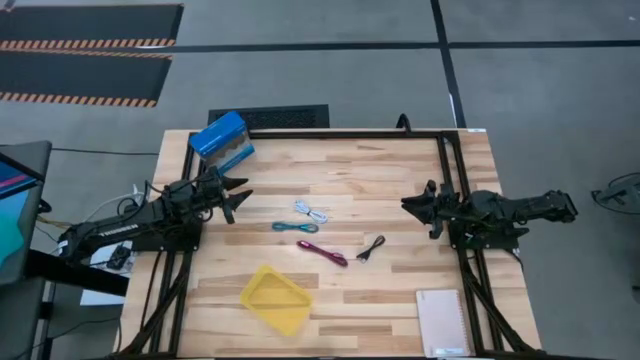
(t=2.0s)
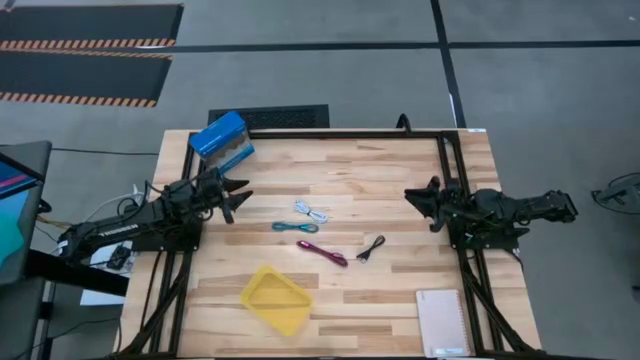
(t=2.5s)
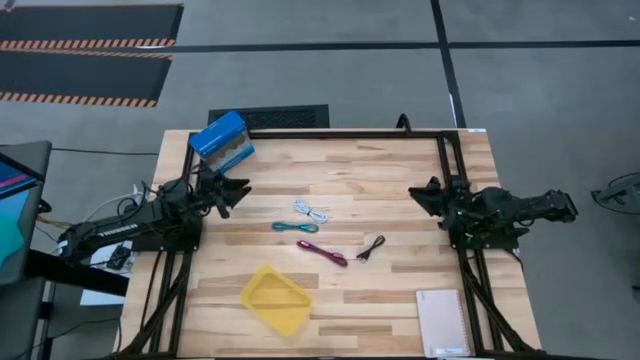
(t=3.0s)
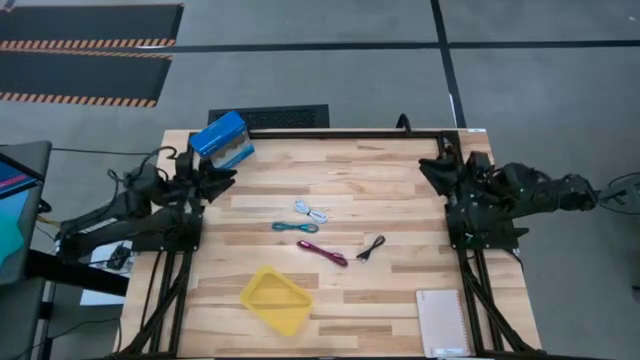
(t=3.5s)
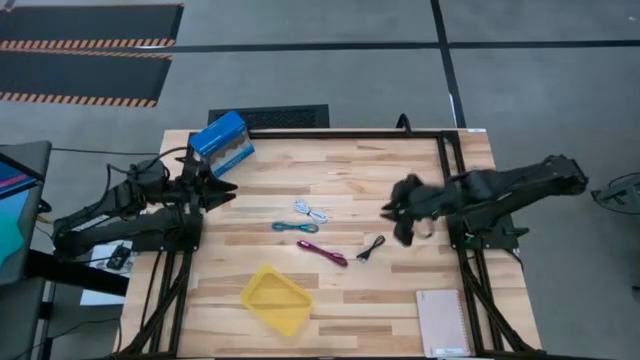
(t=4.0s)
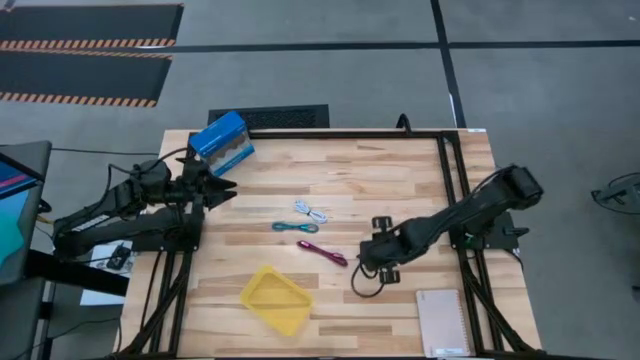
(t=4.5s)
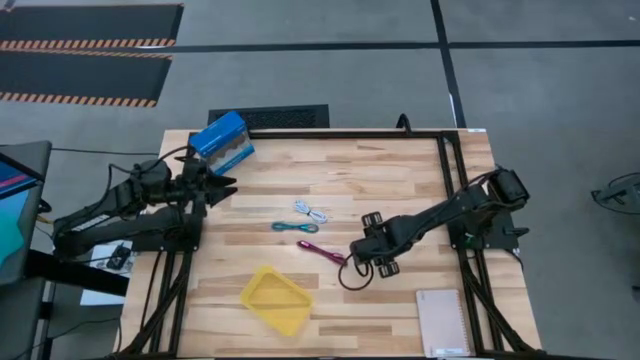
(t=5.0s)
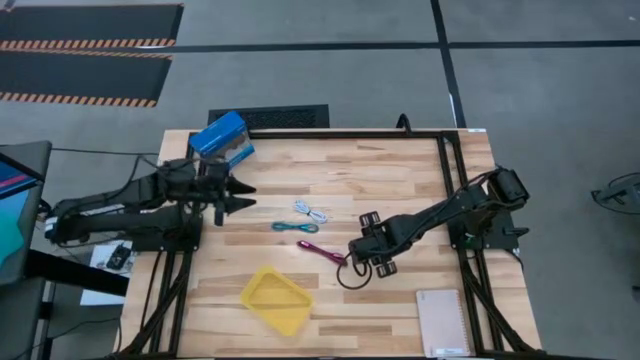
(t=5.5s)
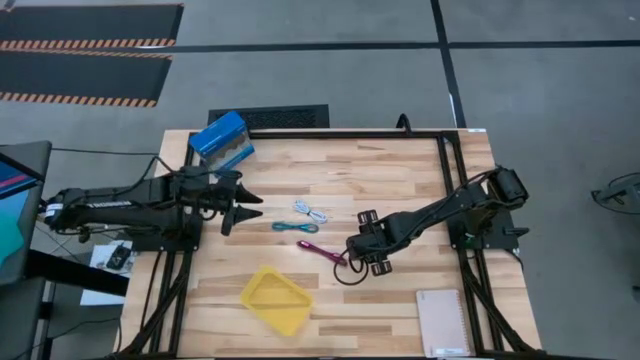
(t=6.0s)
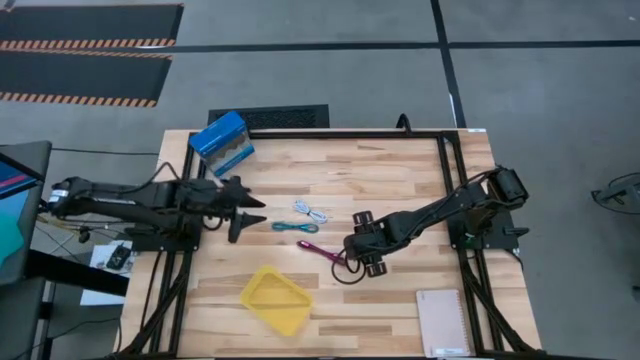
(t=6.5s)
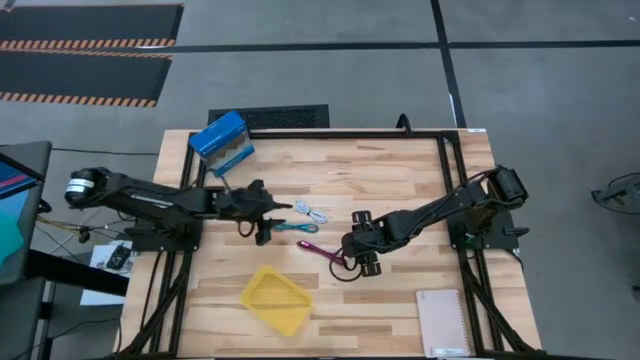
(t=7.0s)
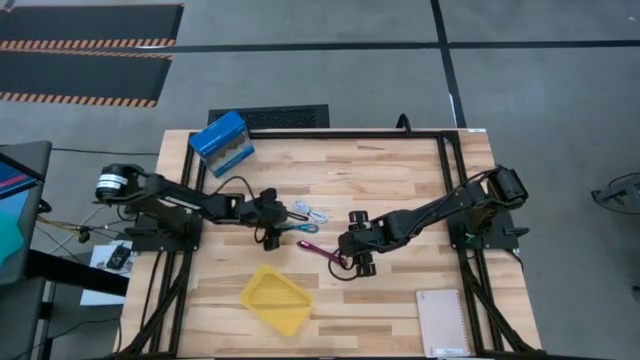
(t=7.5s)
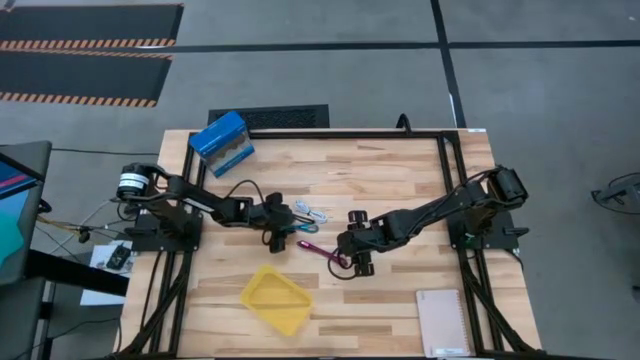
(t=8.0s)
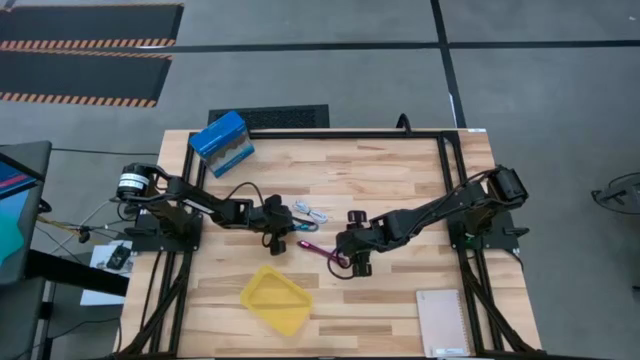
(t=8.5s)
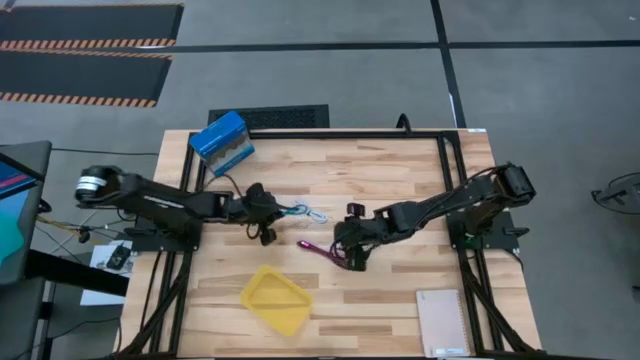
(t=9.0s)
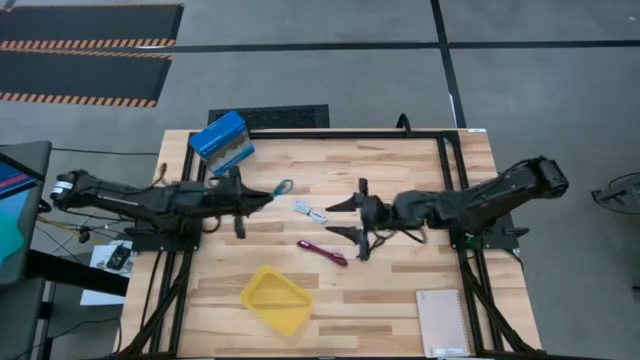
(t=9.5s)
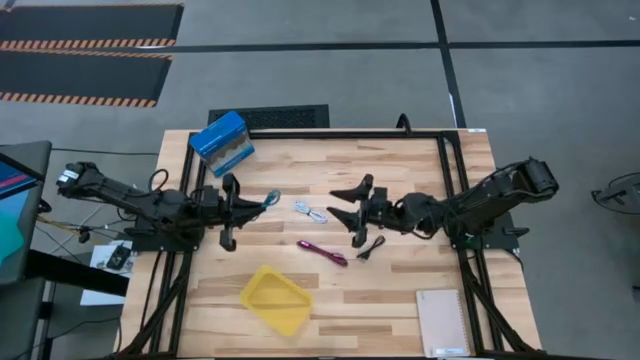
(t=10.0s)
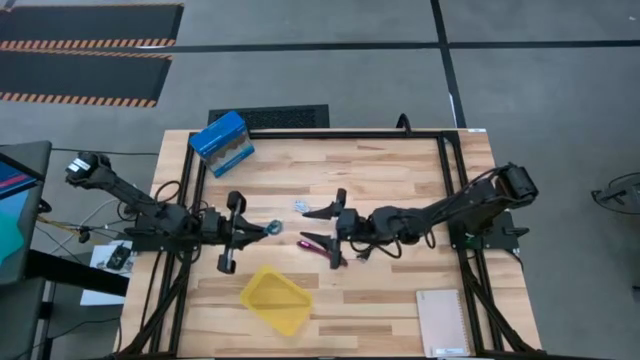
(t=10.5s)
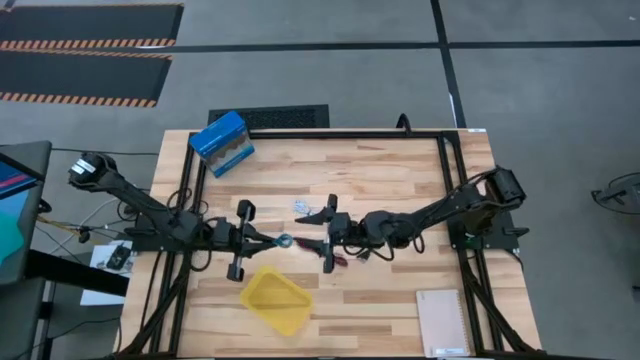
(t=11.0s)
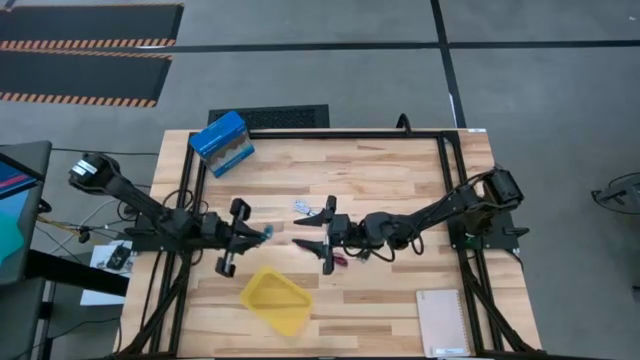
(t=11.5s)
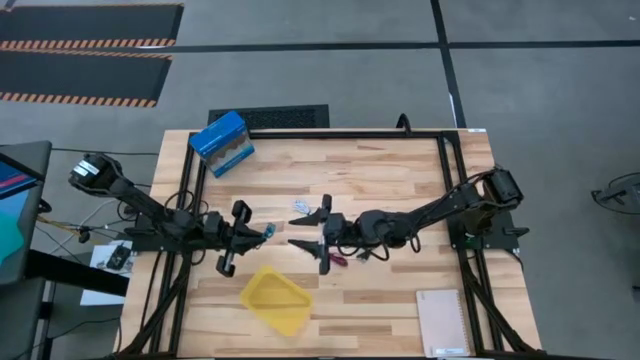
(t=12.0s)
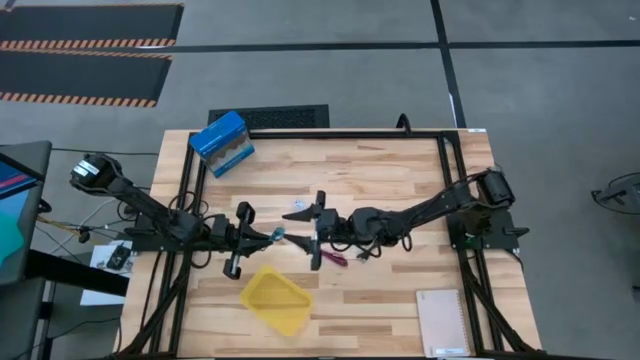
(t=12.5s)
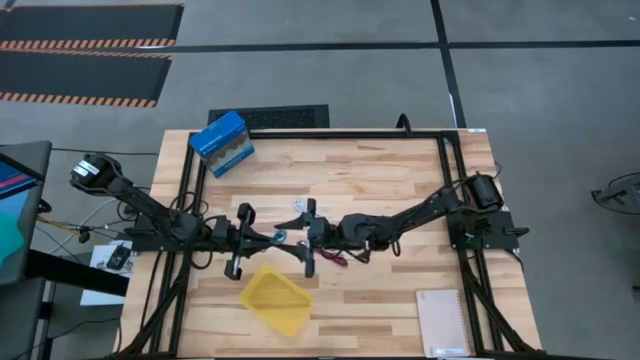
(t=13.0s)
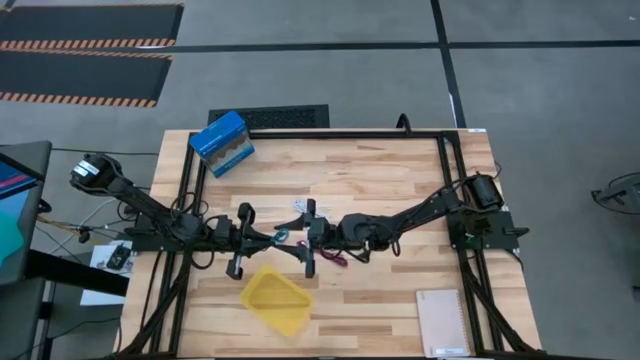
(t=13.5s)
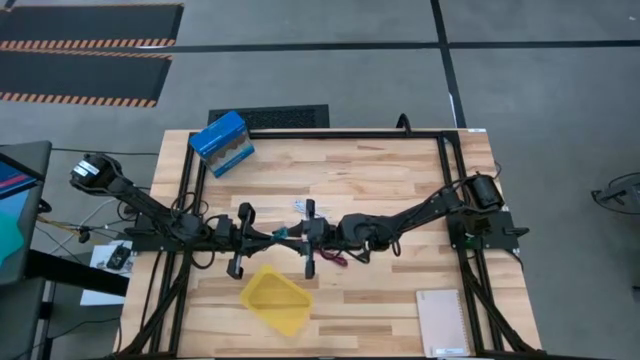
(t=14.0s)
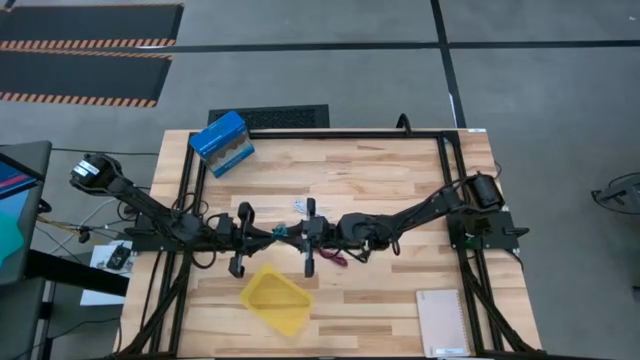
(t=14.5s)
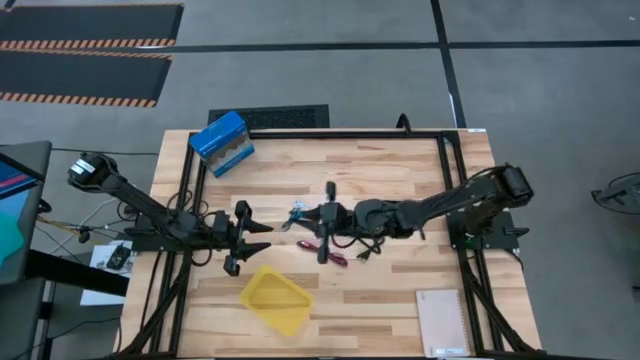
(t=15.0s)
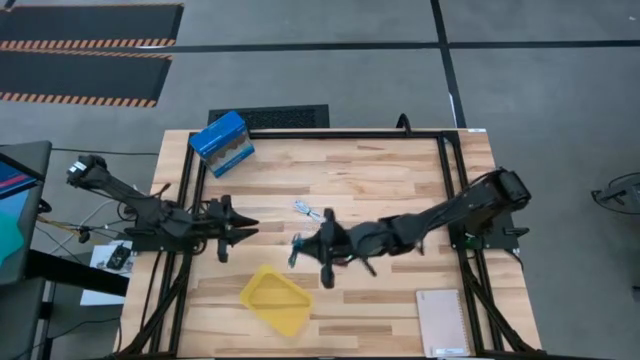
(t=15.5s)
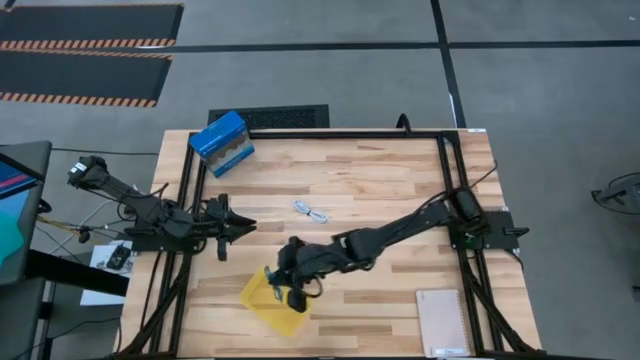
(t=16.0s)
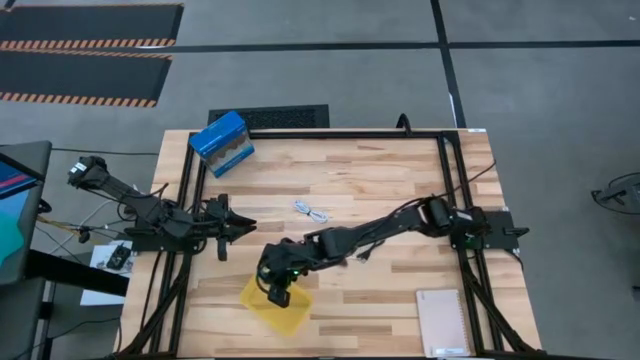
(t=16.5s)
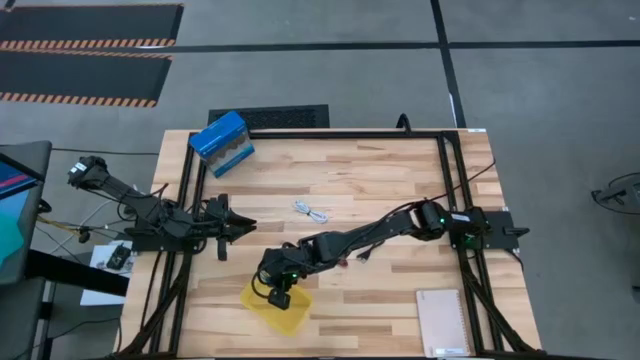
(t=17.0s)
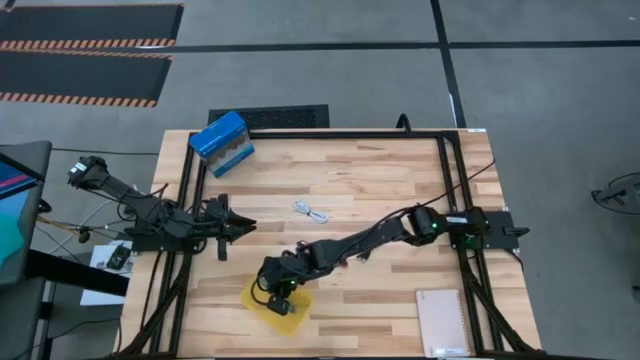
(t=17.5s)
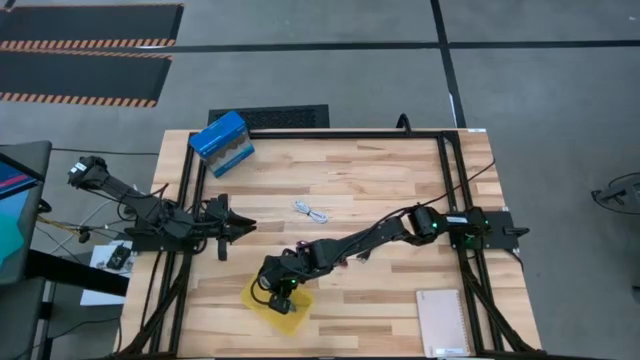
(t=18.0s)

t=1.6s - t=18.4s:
Task: Pick and place USB-C Cables
Put the blue black charger cable into the yellow transparent bin

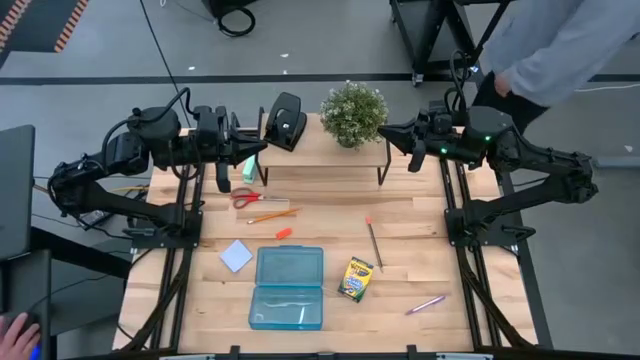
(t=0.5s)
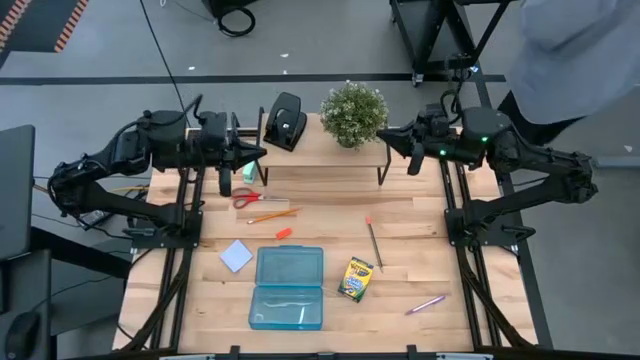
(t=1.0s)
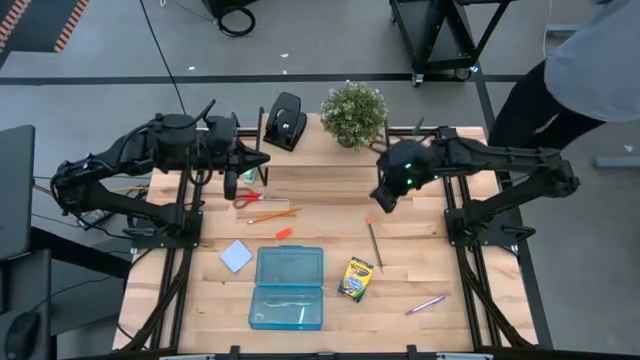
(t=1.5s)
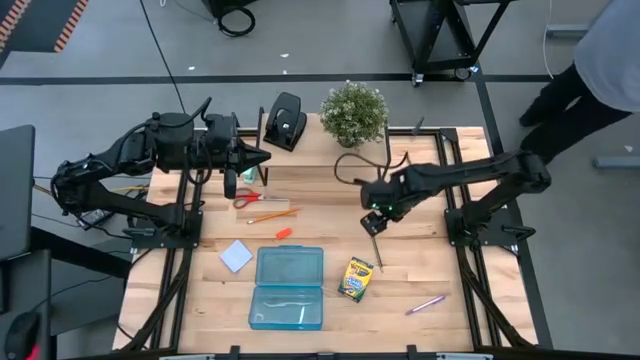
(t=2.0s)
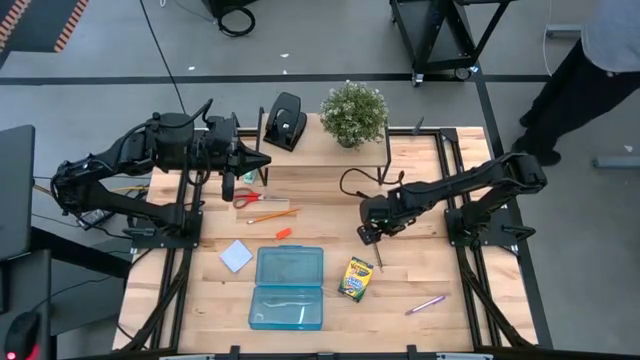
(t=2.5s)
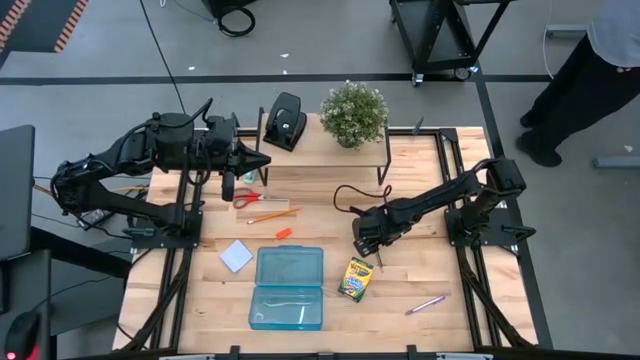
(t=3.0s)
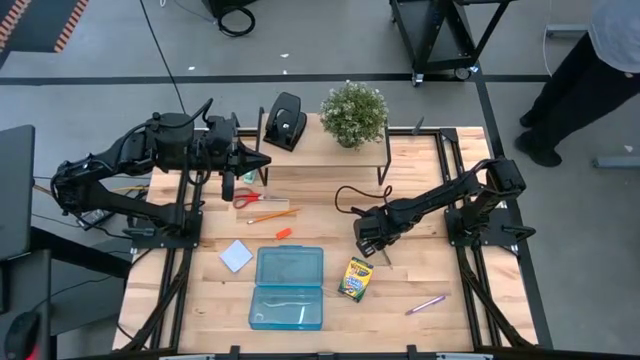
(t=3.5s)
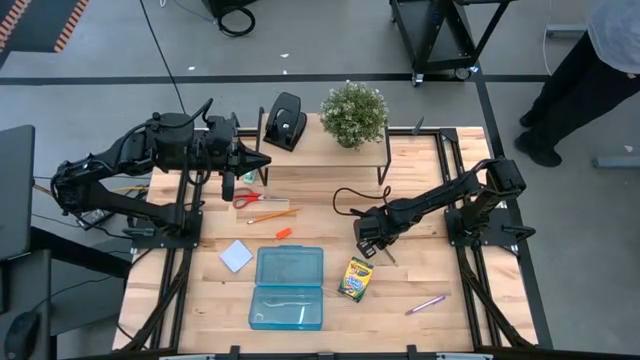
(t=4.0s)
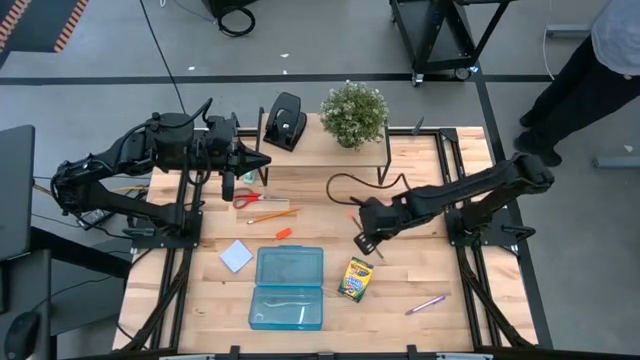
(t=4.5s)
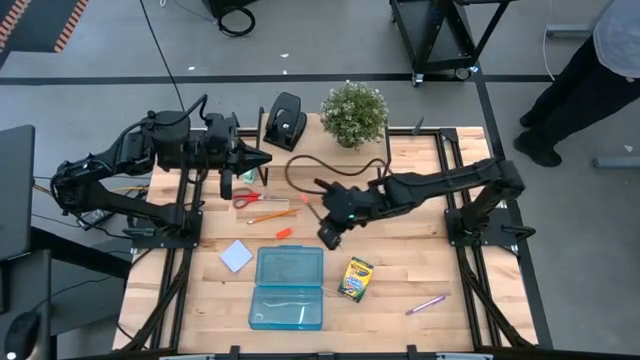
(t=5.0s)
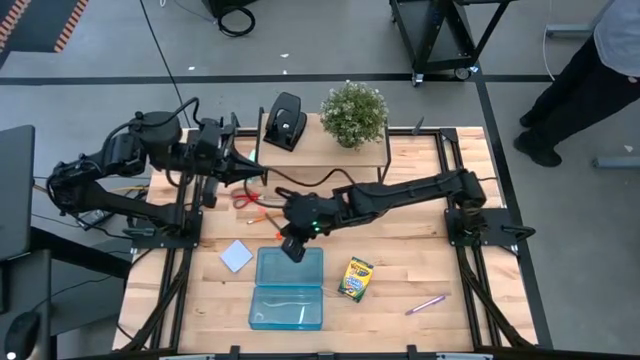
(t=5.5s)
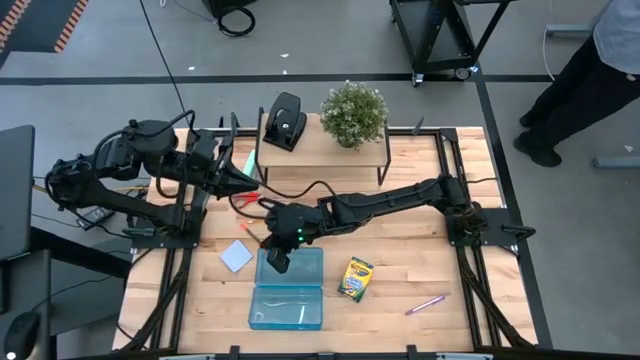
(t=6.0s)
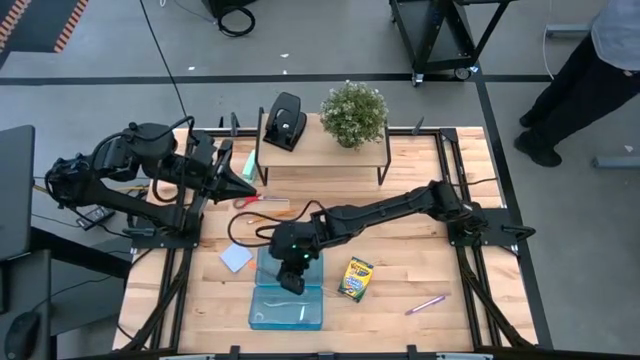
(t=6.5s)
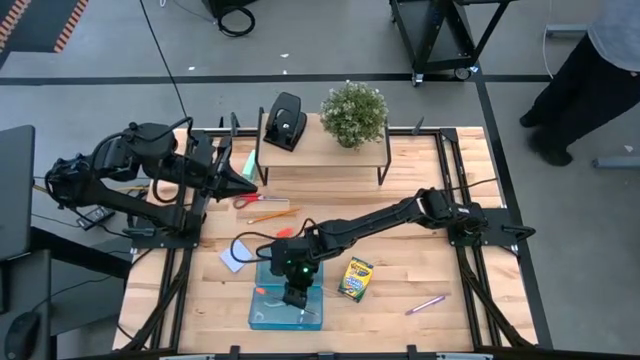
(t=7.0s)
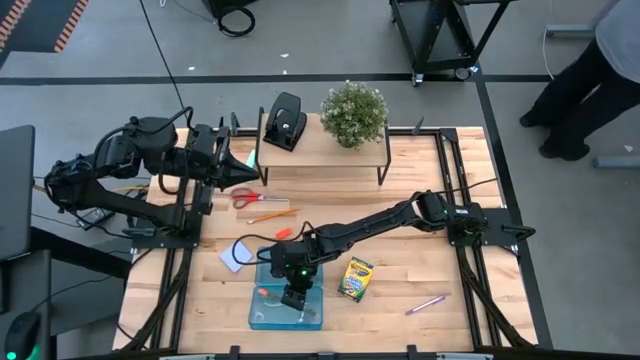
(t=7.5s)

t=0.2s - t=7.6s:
Task: Pack school essentials
Put the black pencil into the blue supply box
